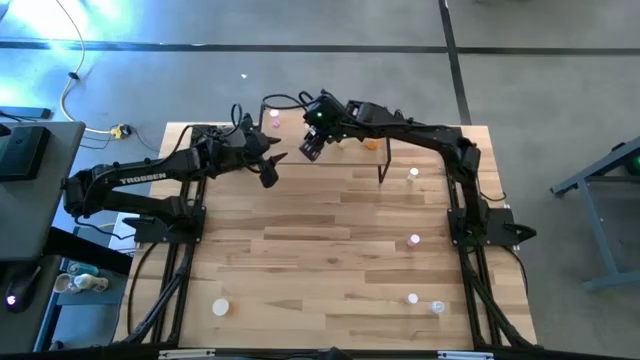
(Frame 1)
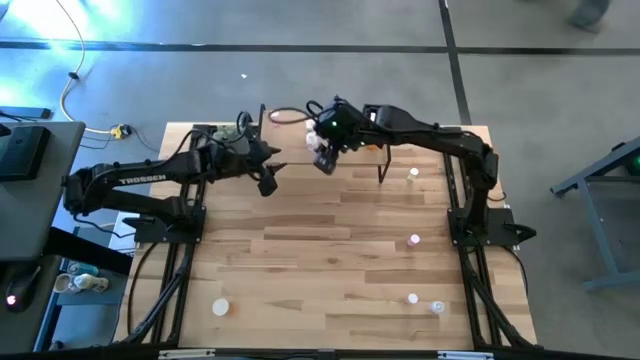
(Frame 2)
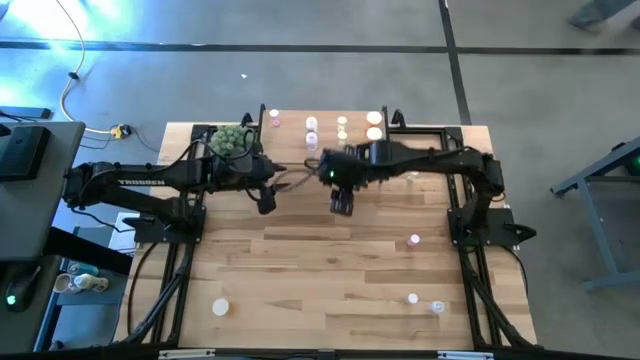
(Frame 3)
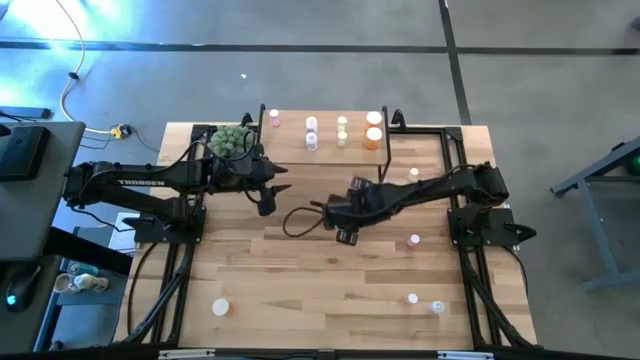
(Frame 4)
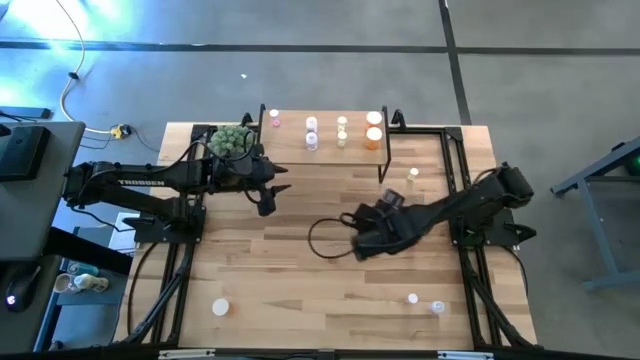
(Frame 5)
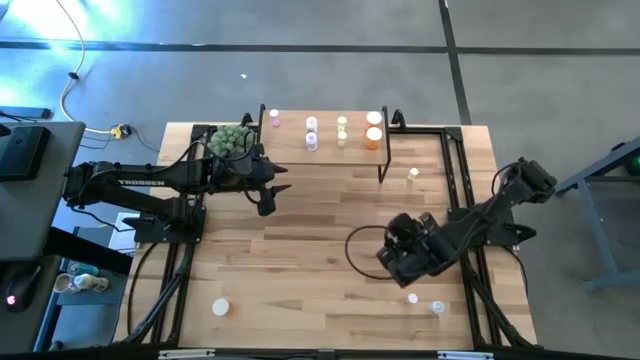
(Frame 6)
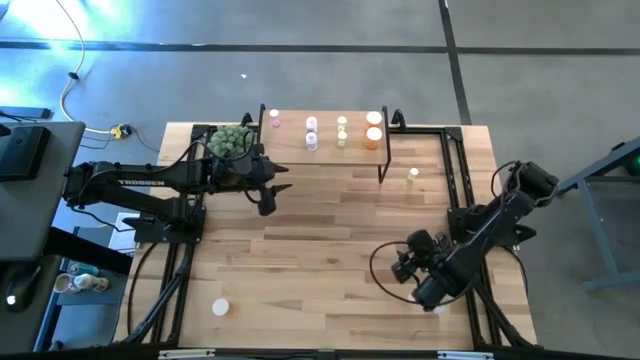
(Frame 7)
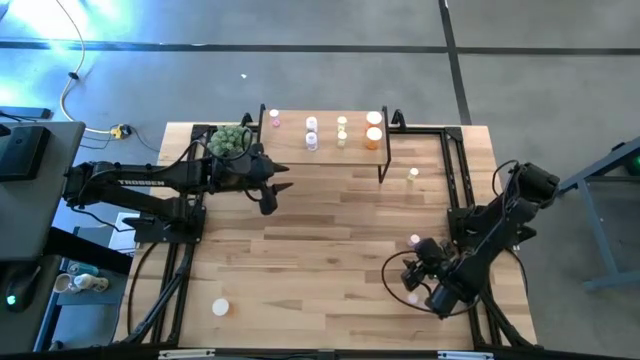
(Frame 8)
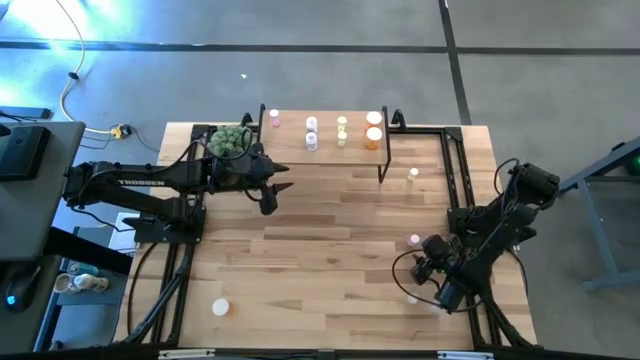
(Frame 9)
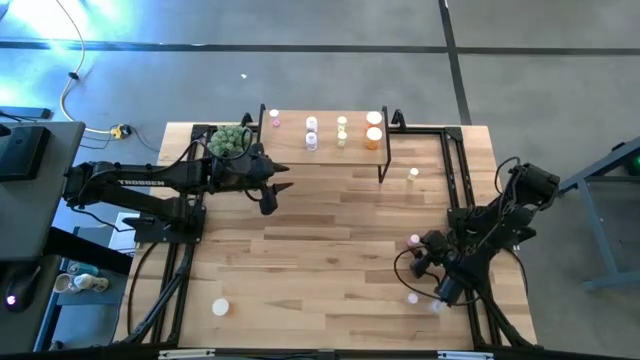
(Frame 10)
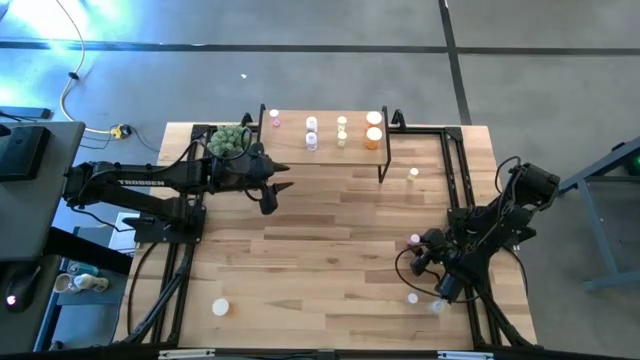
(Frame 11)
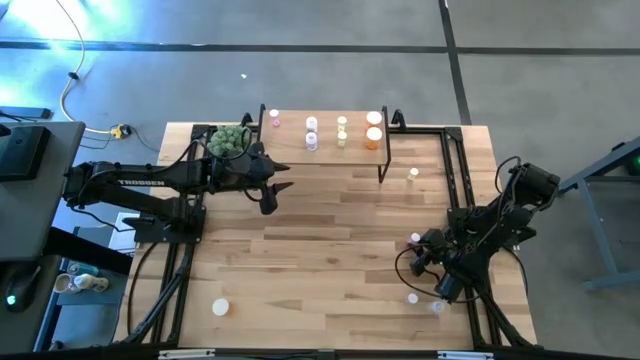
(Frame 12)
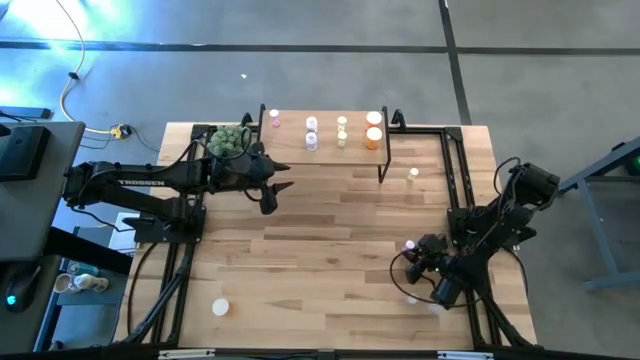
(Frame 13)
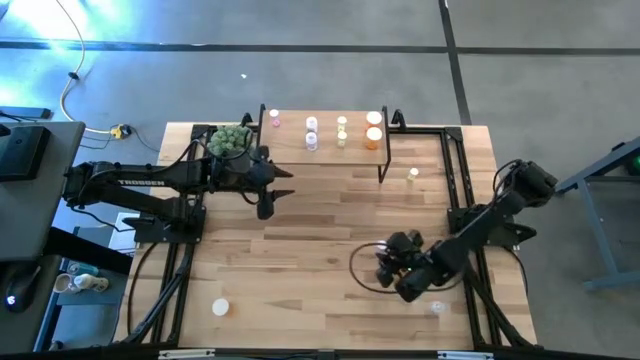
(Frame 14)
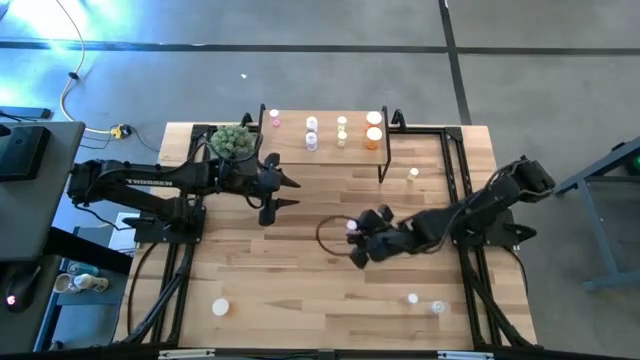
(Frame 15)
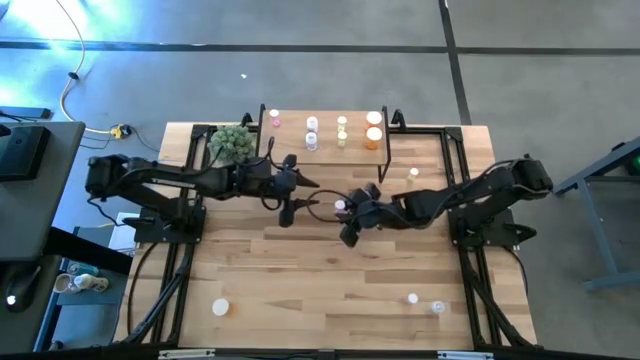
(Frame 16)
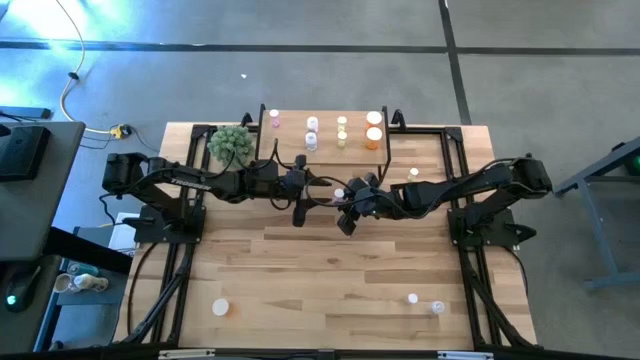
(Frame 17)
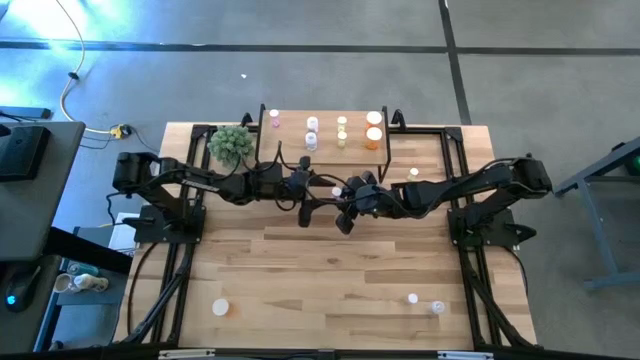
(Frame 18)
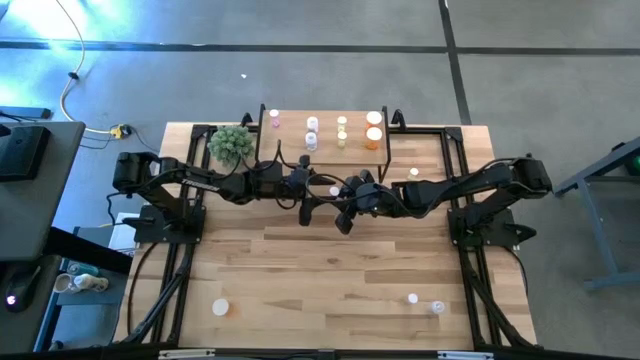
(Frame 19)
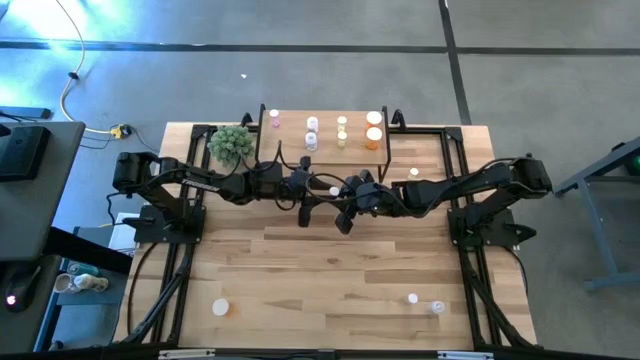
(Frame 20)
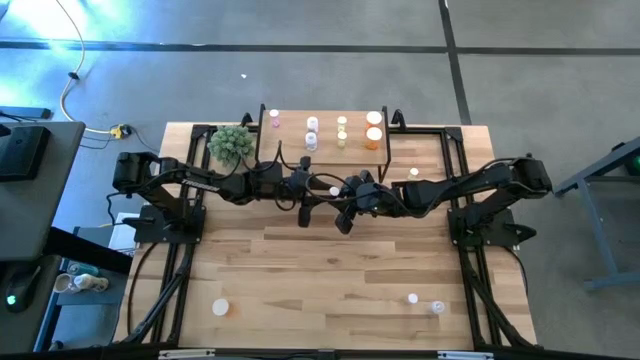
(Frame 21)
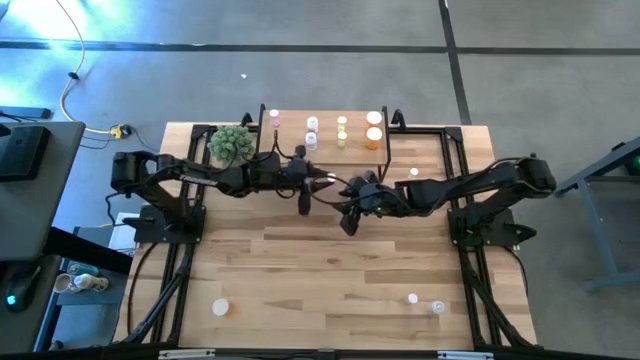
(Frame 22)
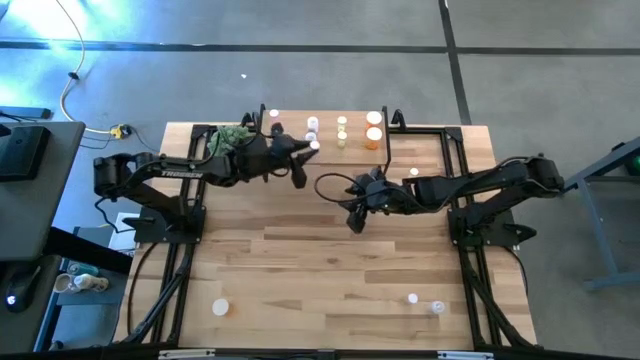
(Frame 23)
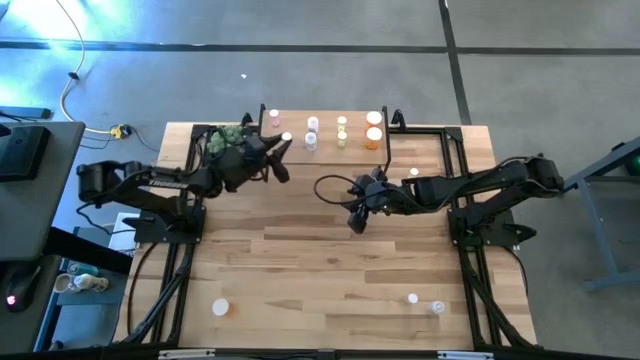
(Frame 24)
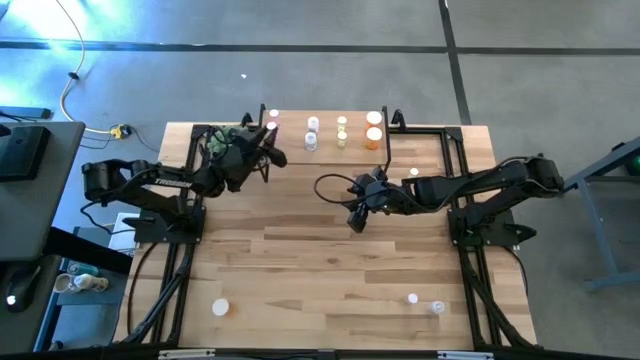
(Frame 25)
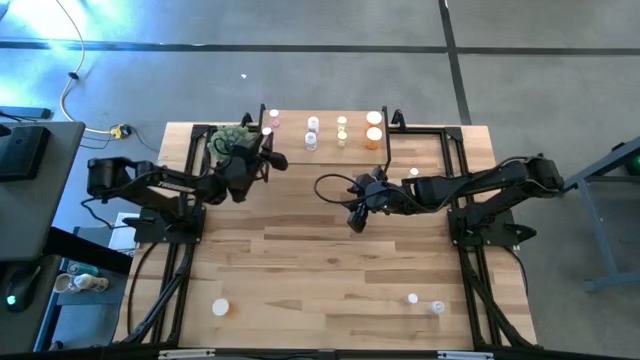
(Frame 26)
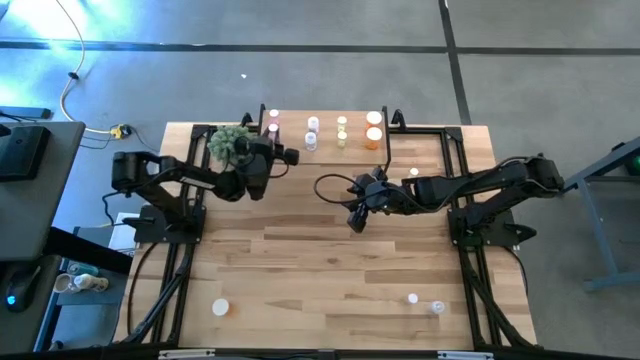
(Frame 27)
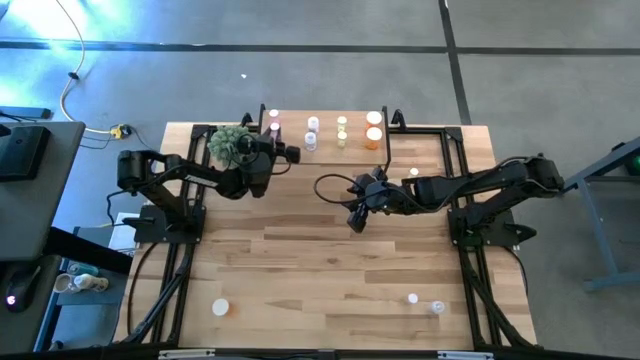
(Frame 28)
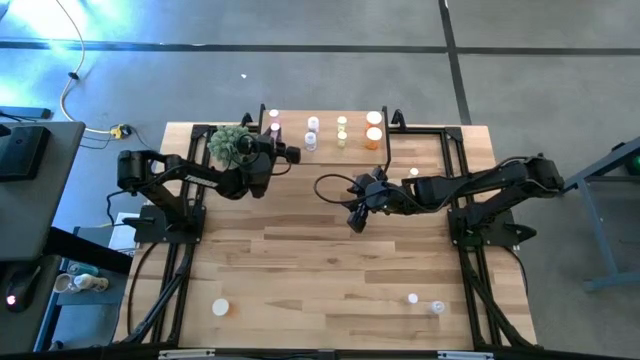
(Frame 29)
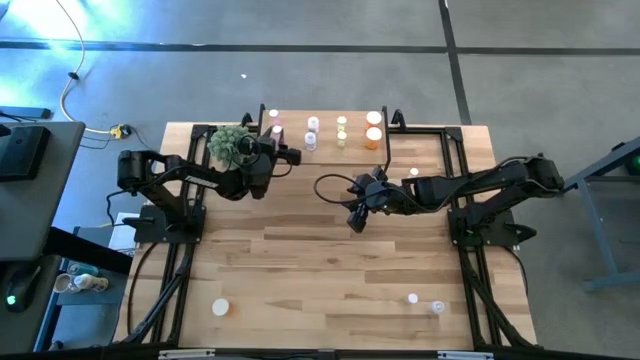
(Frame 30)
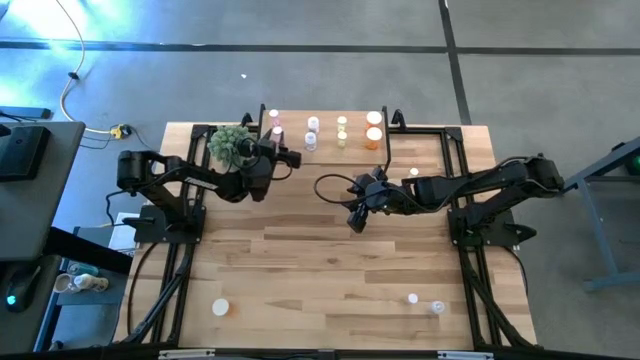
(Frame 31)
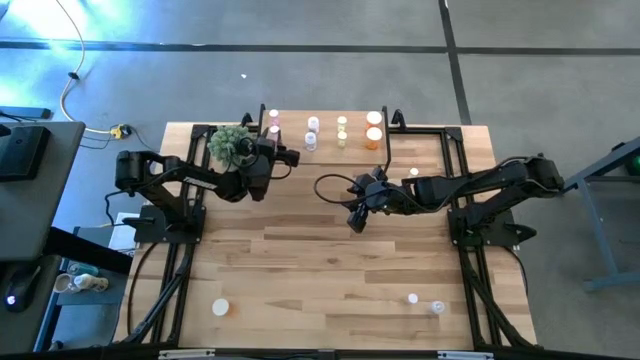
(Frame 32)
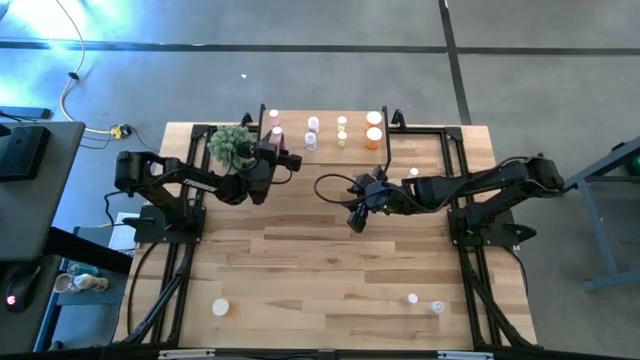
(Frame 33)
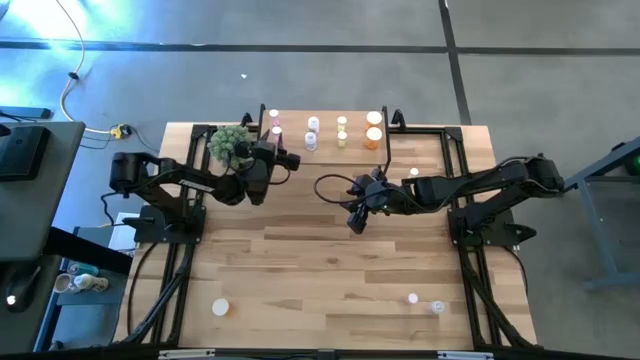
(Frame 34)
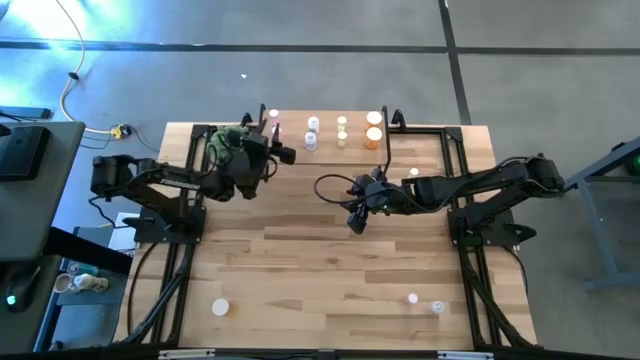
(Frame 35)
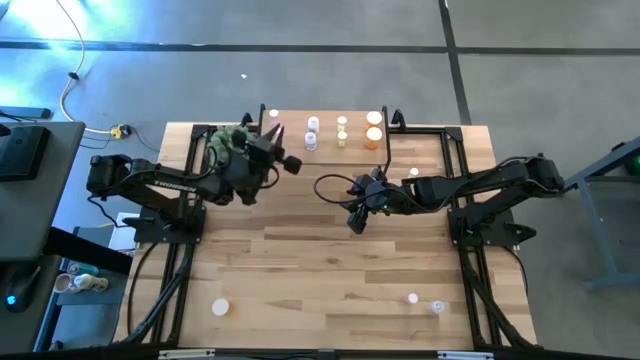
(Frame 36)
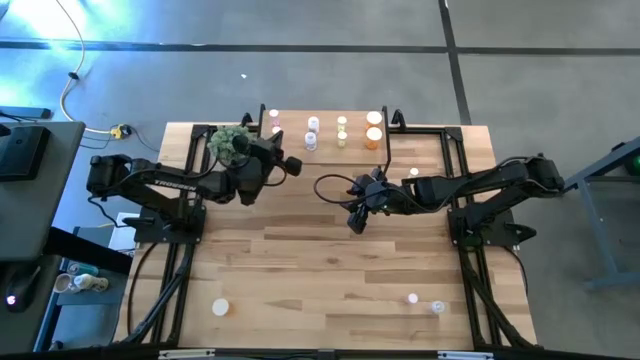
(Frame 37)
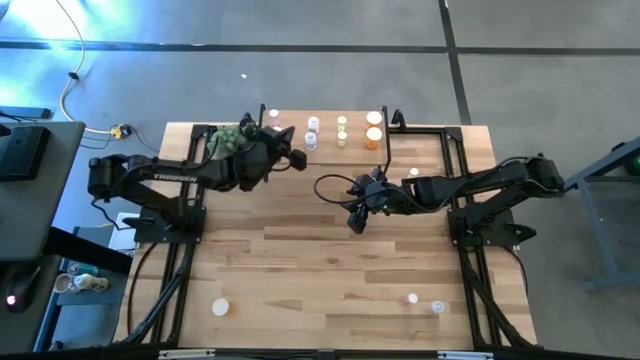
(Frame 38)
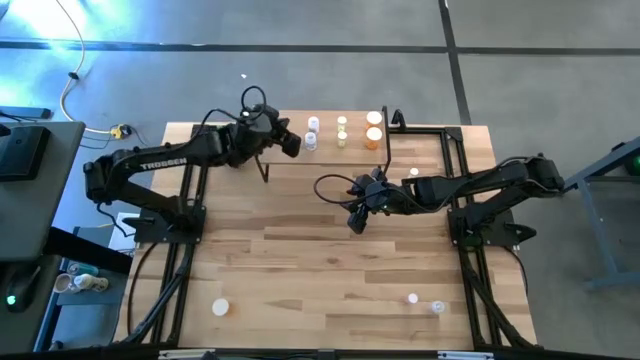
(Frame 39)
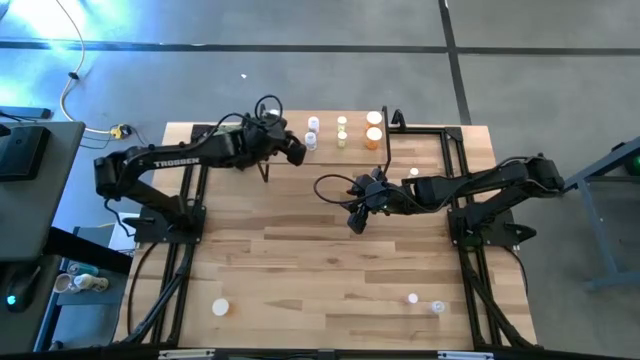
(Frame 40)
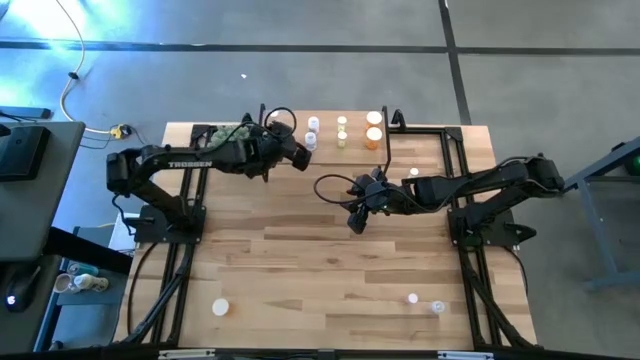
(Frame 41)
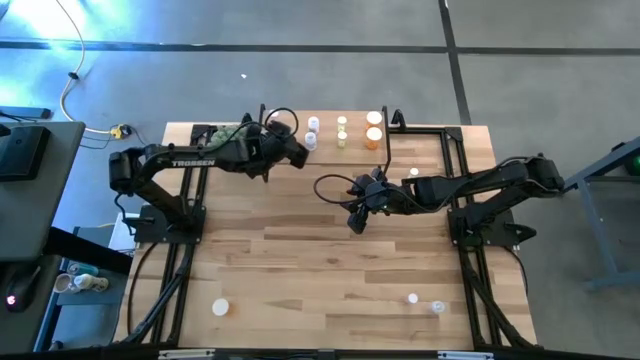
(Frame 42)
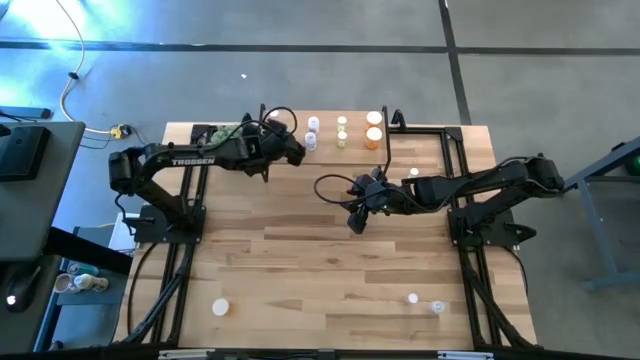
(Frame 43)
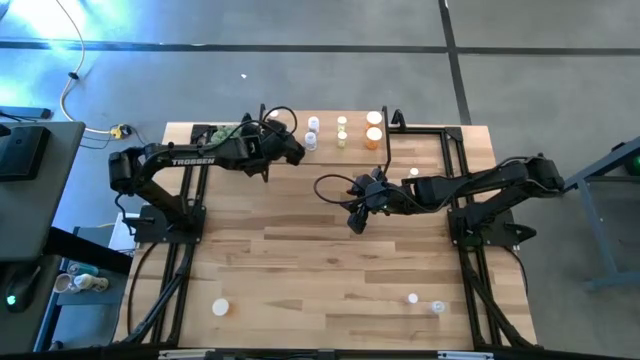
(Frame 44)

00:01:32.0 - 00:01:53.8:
Task: Pick and place medicine bottles onto shelf by color
Put the top pink bottle on the shelf aligned with the other pink pill bottle

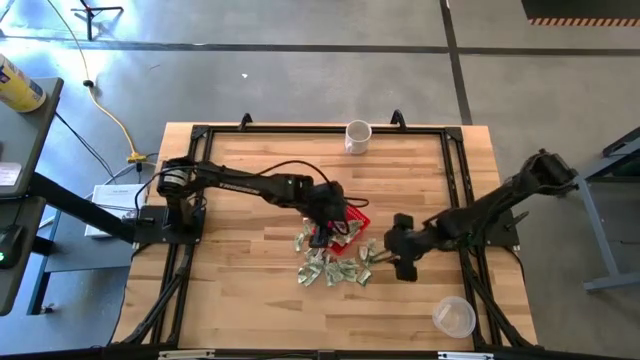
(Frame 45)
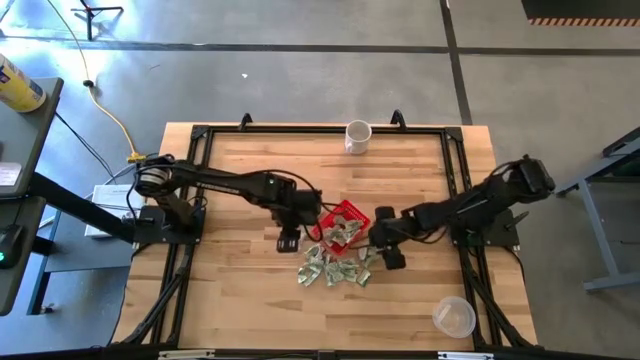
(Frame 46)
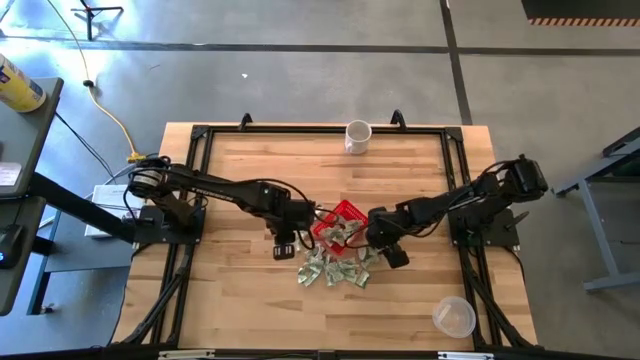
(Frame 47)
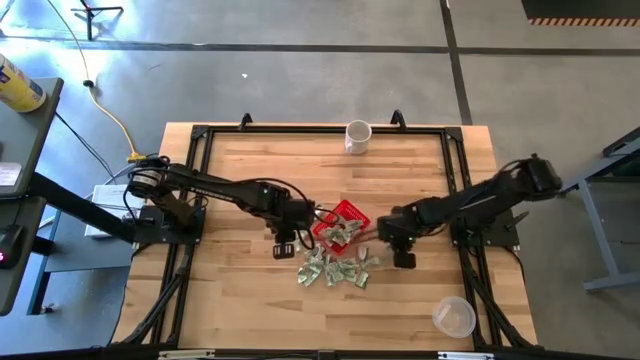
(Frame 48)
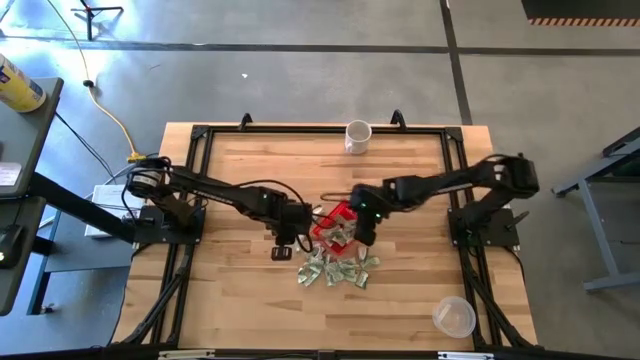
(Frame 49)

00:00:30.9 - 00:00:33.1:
Task: Pick and place items into bin
Put the white stevia packet into the red bin
